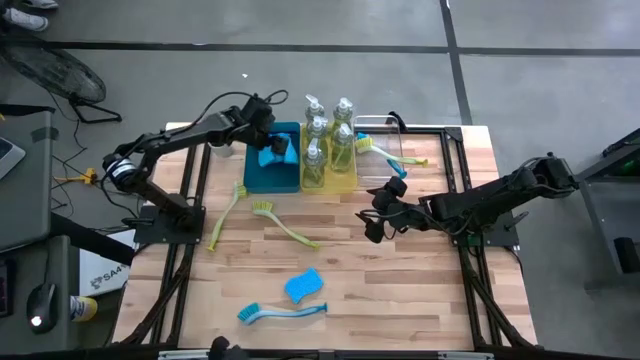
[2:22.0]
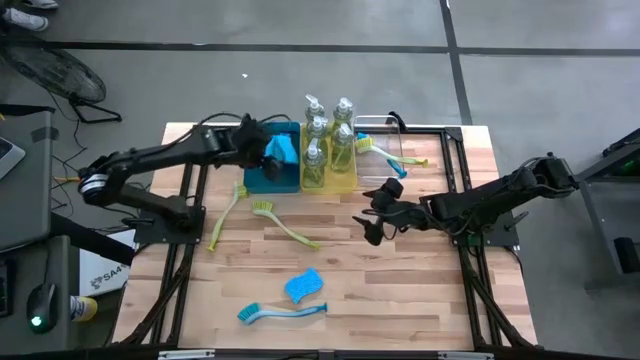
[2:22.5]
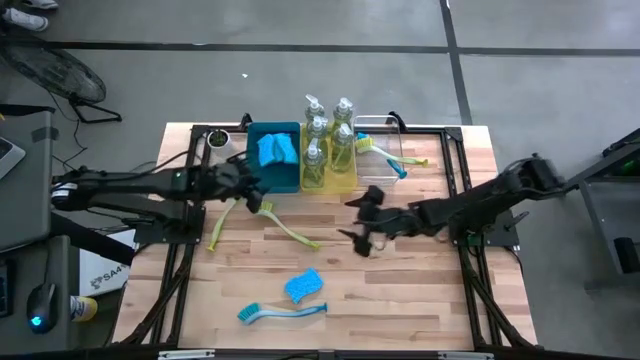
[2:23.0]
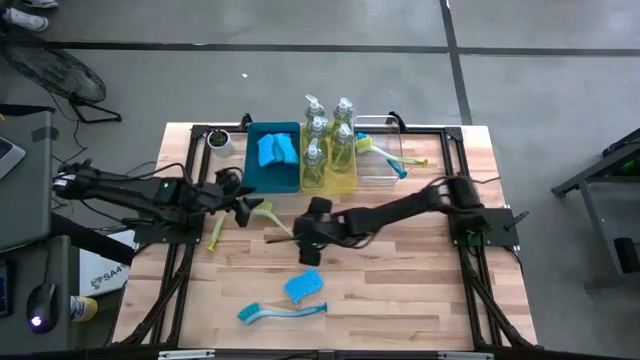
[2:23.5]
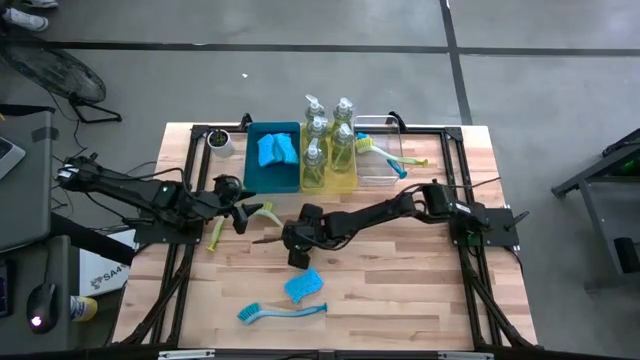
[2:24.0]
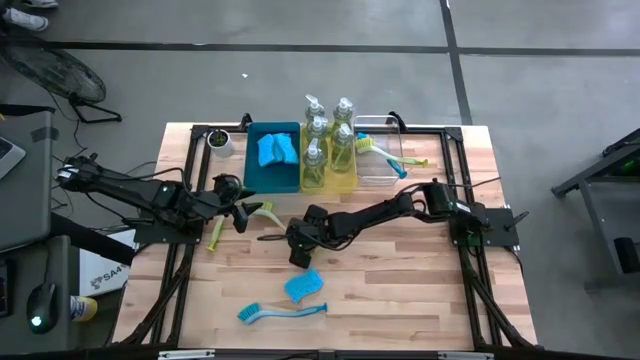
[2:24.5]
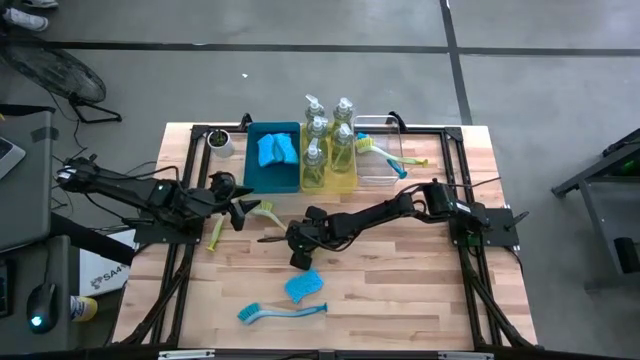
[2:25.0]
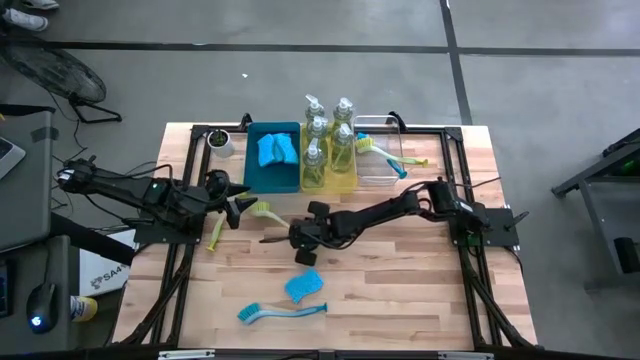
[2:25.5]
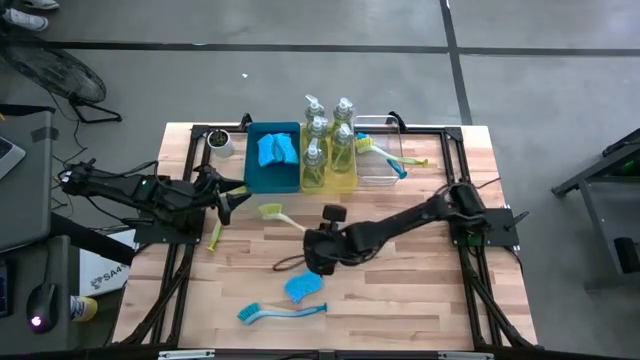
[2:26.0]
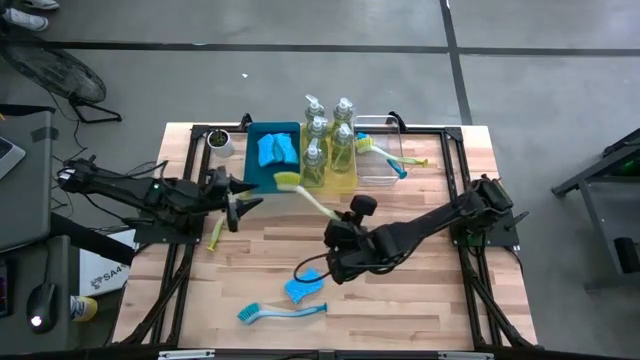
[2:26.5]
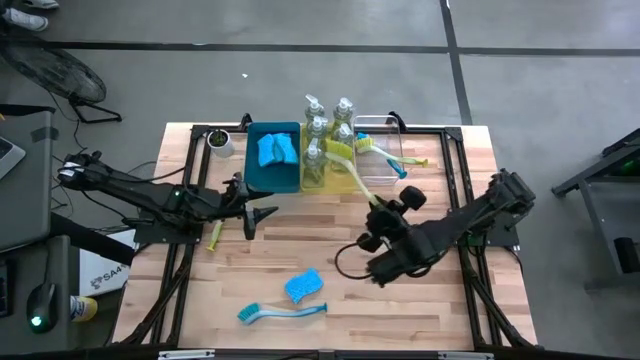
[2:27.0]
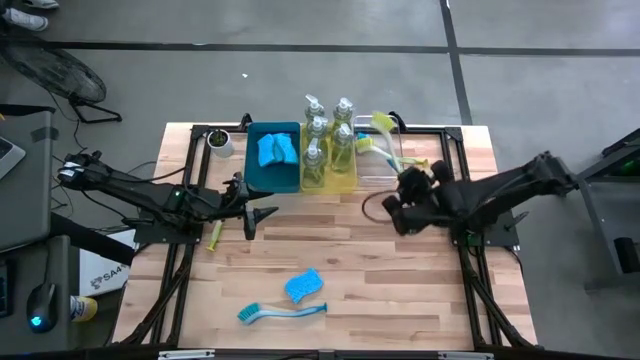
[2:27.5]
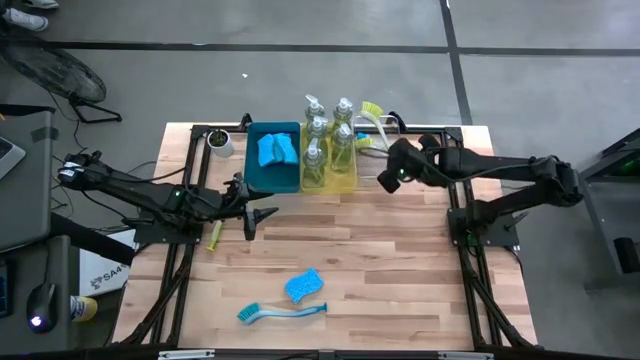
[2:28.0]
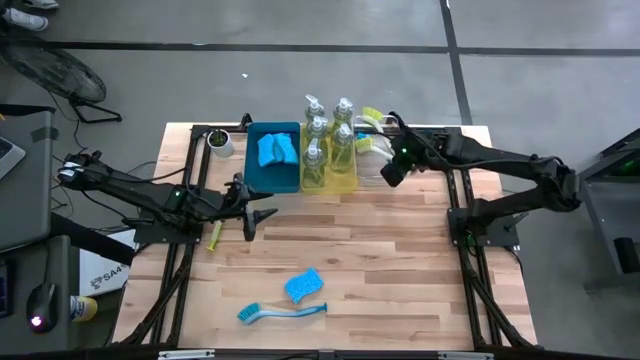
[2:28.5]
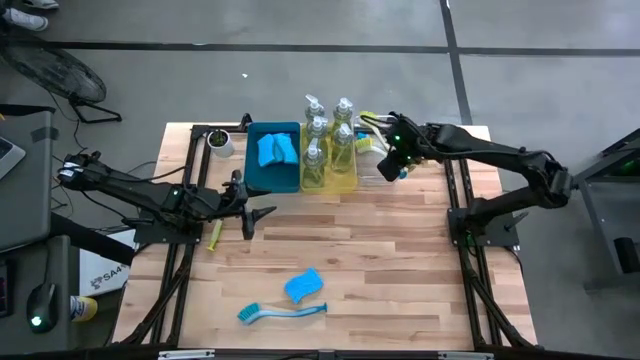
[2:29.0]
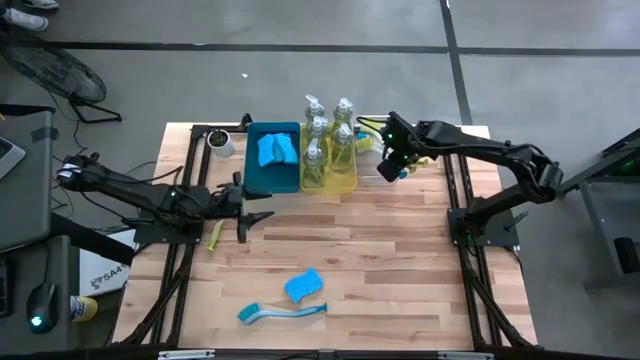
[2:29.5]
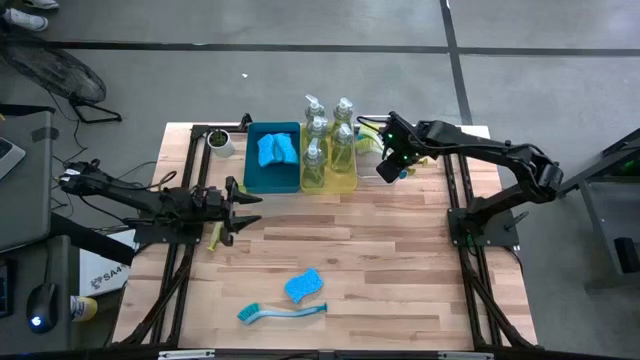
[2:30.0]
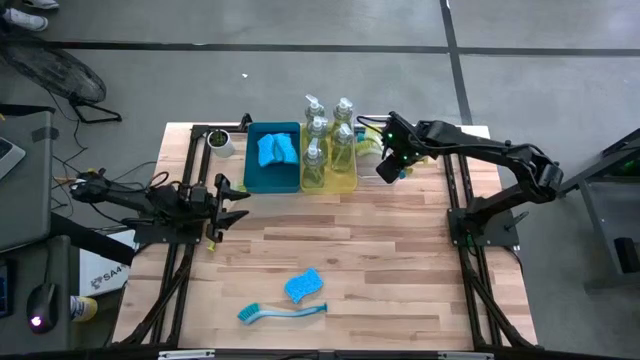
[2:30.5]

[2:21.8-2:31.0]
Task: Pick & Place Kitchen Sink Supplies
Put the green toilet brush into the transparent bin

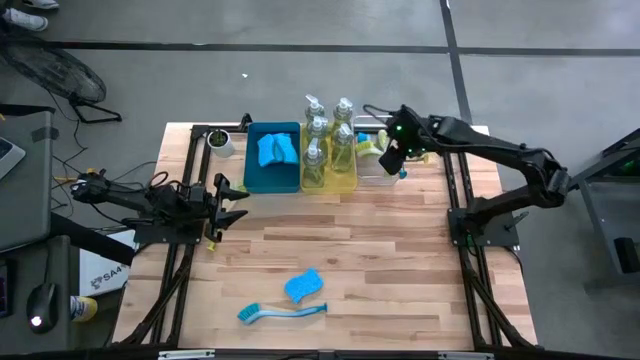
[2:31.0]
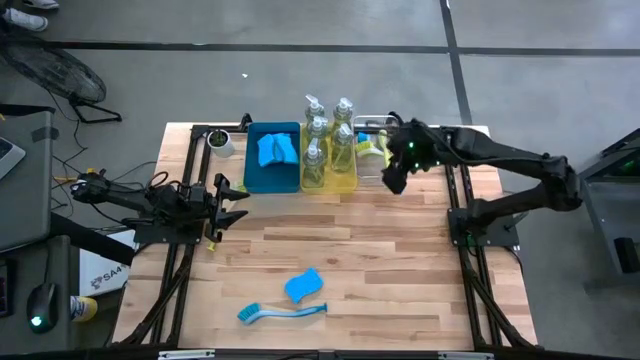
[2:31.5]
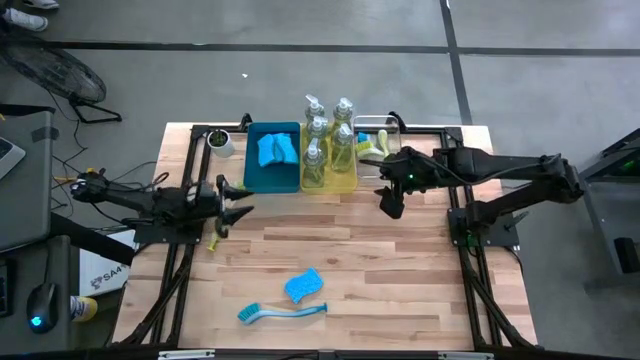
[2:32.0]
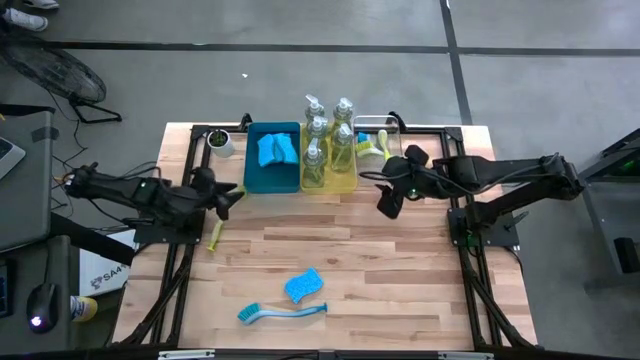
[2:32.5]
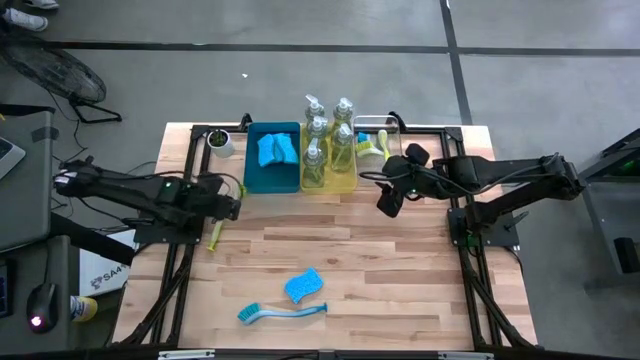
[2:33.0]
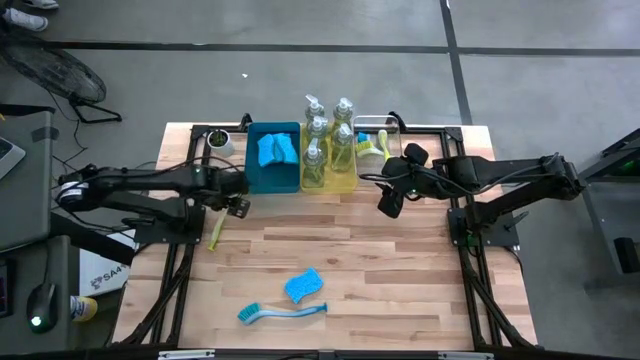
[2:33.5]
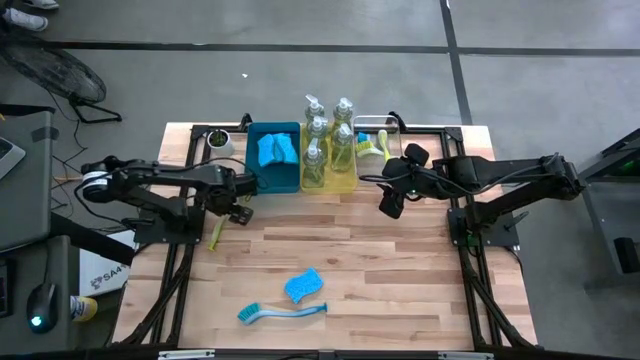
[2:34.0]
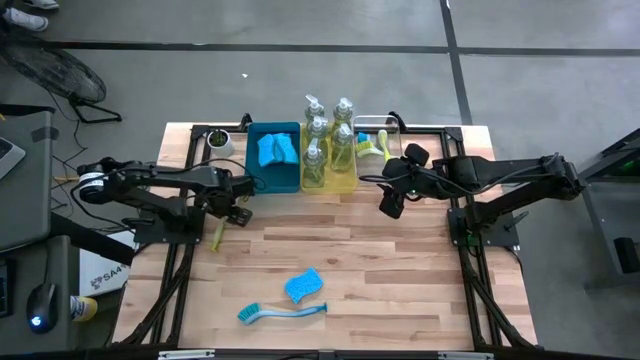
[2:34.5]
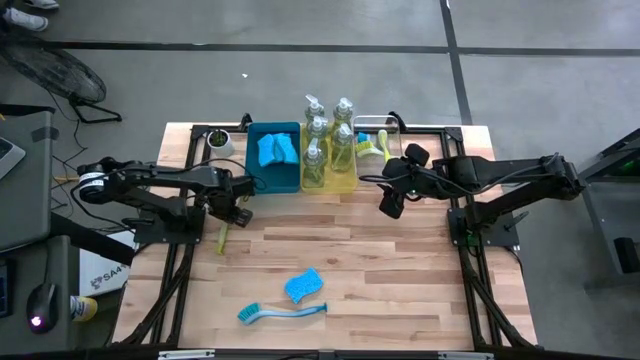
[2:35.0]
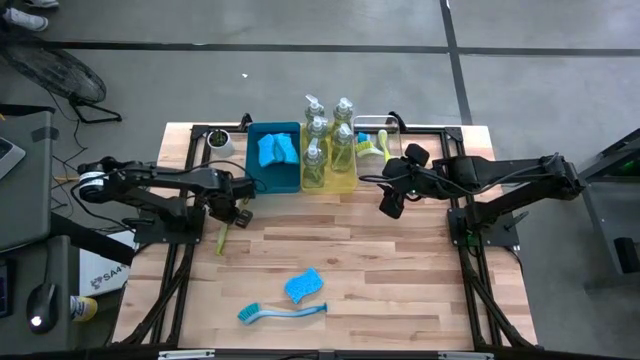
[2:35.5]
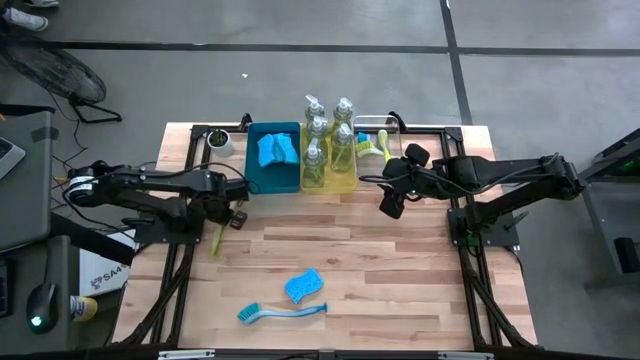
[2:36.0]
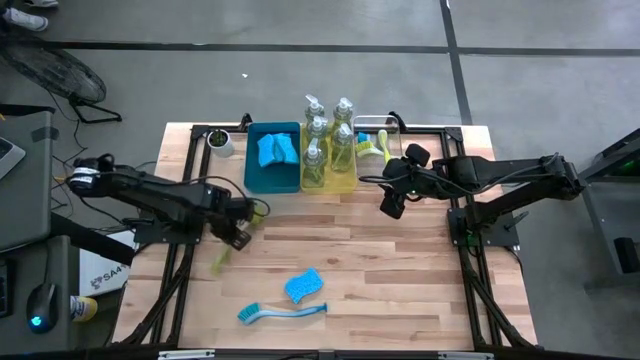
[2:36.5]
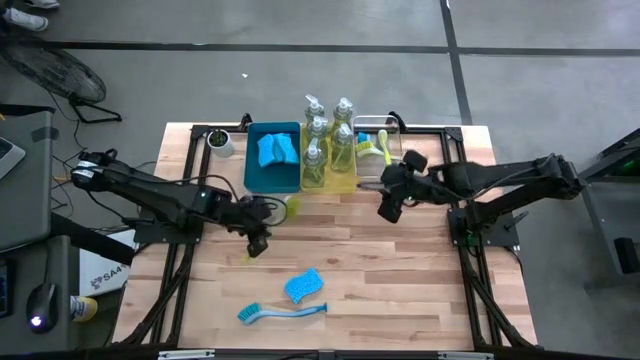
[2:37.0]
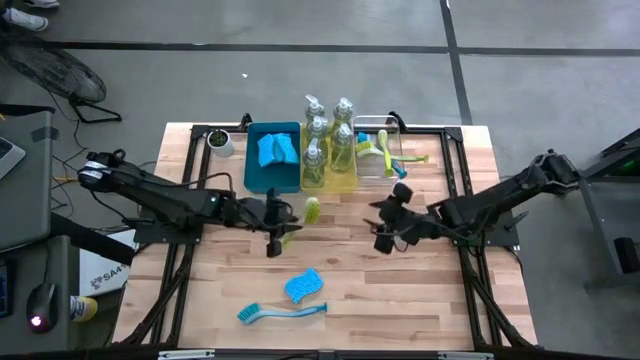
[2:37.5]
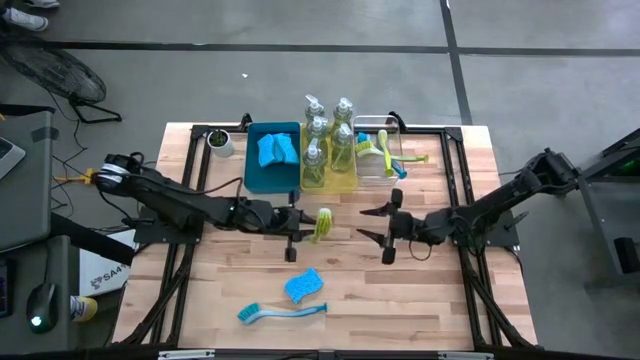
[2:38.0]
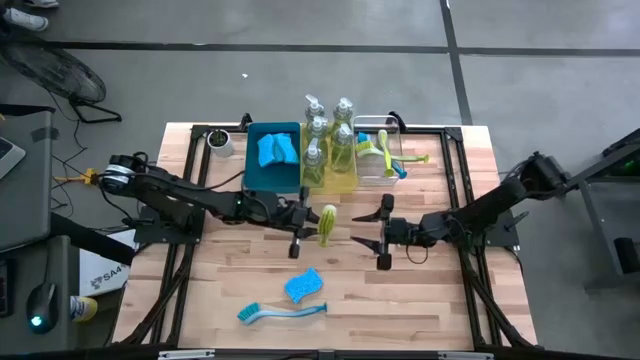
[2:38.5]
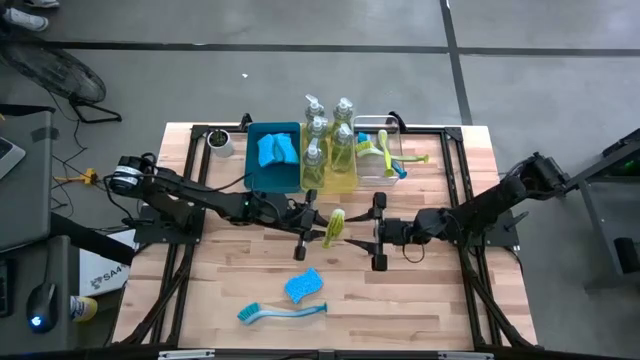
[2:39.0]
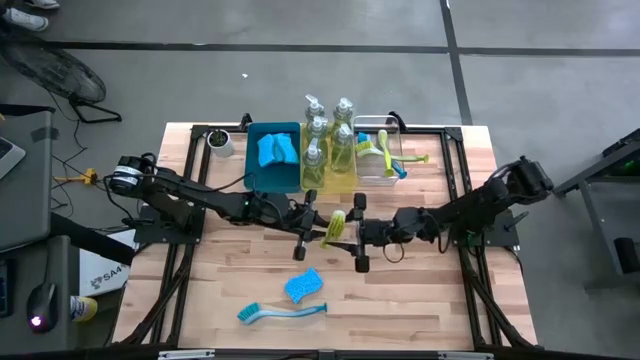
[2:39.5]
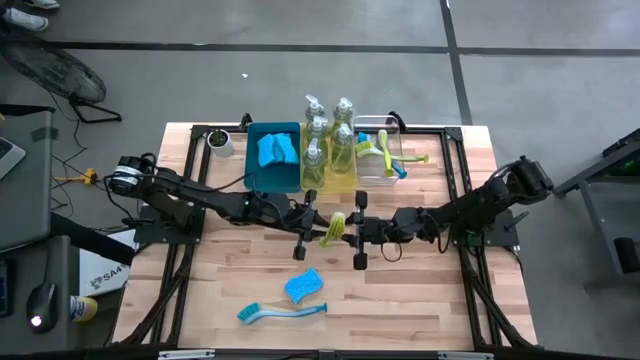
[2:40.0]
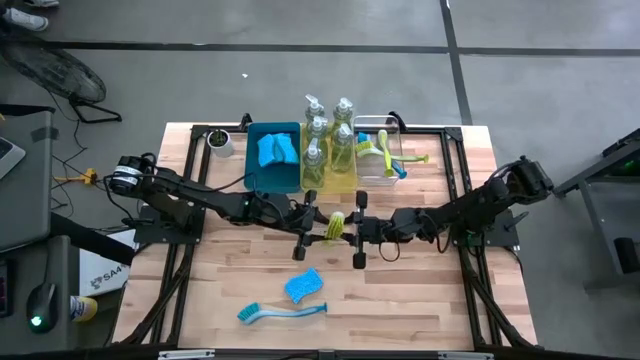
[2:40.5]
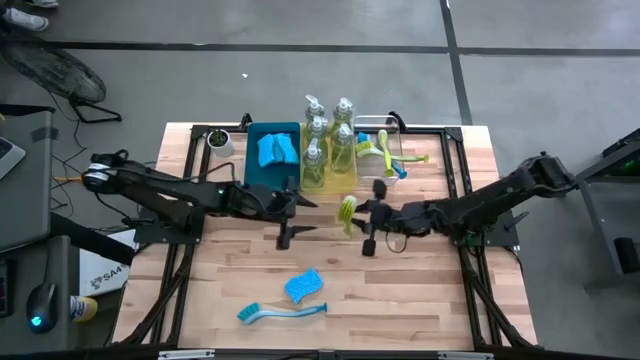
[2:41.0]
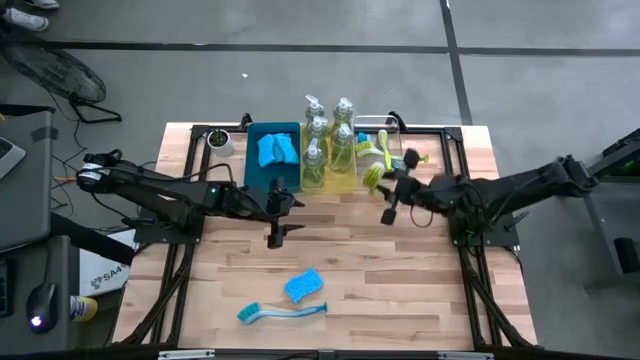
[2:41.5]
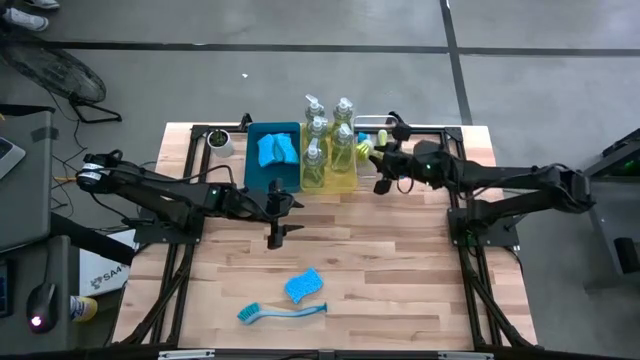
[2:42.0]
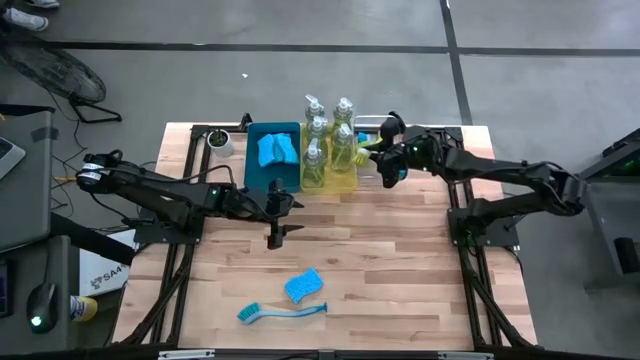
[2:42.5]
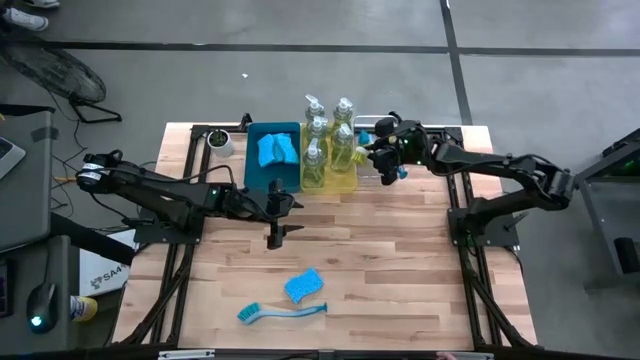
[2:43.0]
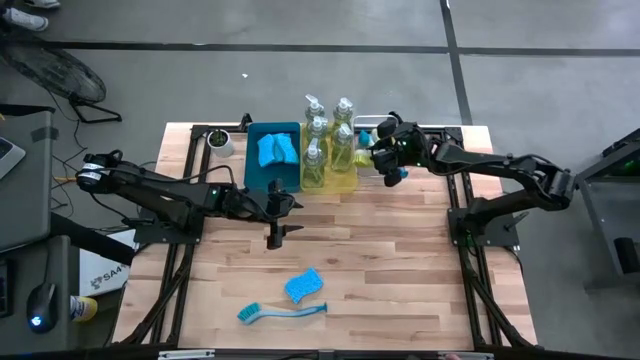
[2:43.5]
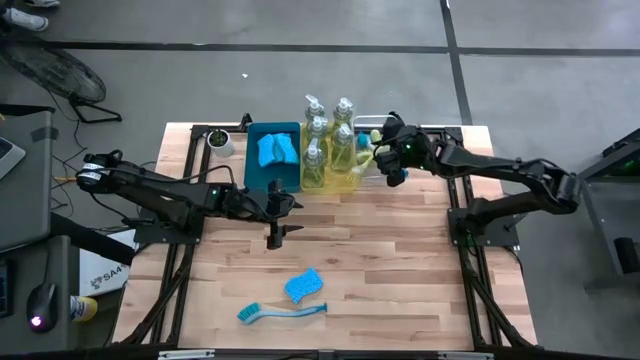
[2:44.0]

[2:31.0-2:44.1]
Put the green toilet brush into the transparent bin
